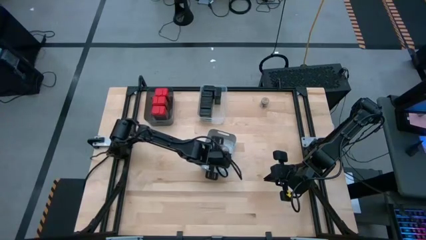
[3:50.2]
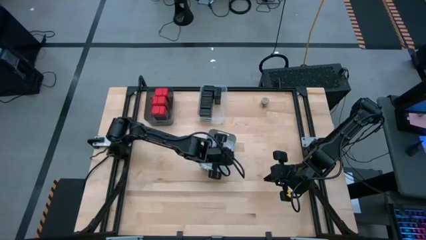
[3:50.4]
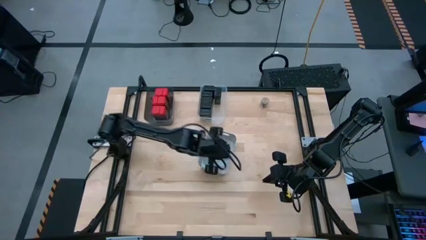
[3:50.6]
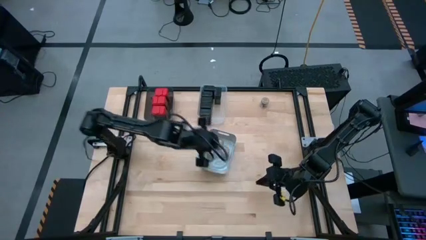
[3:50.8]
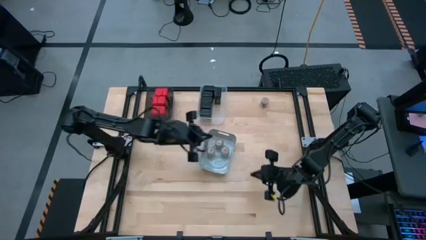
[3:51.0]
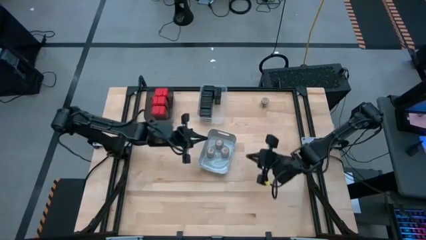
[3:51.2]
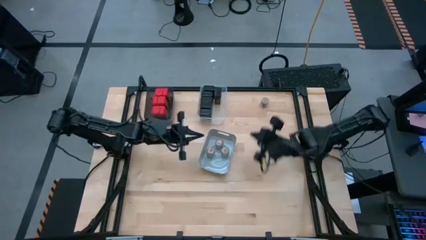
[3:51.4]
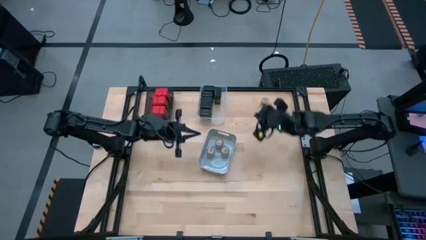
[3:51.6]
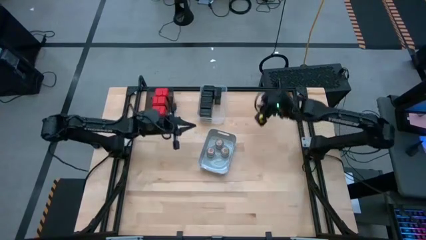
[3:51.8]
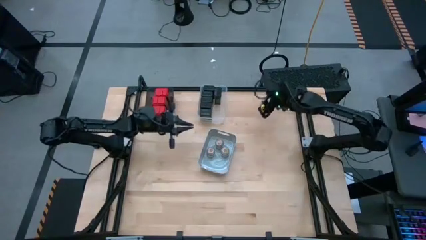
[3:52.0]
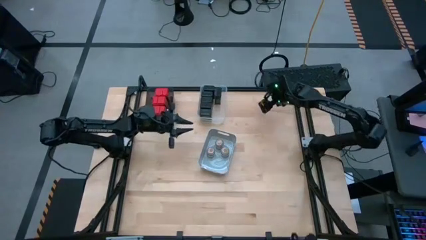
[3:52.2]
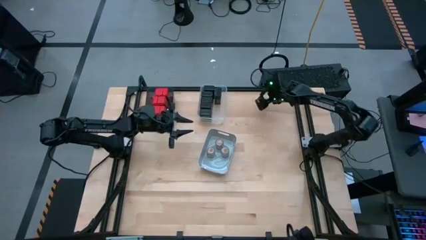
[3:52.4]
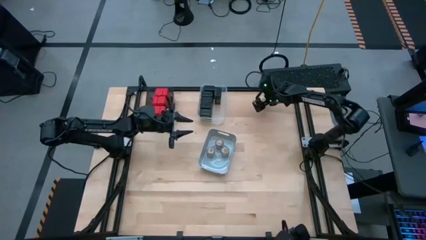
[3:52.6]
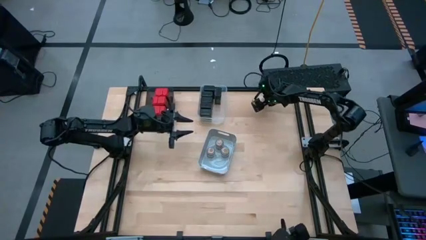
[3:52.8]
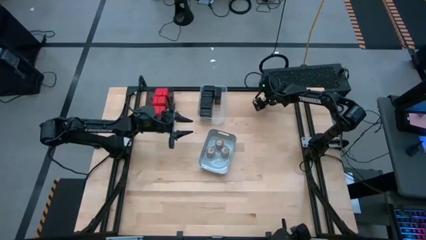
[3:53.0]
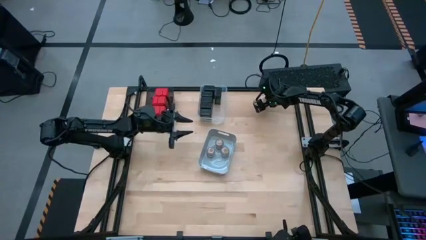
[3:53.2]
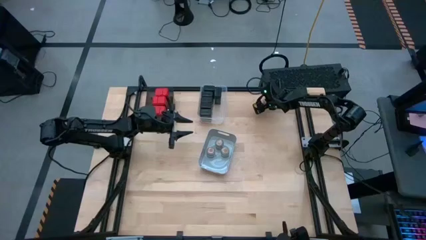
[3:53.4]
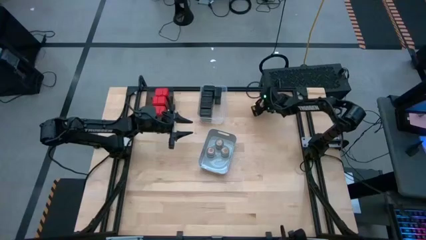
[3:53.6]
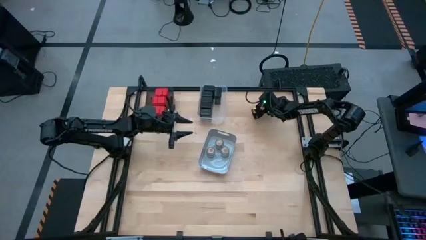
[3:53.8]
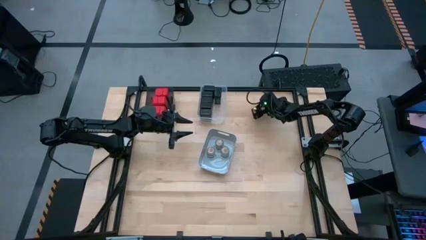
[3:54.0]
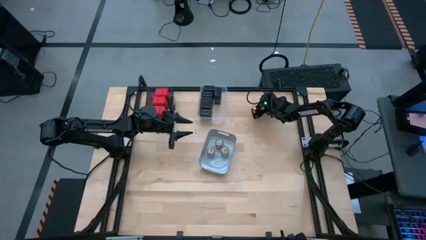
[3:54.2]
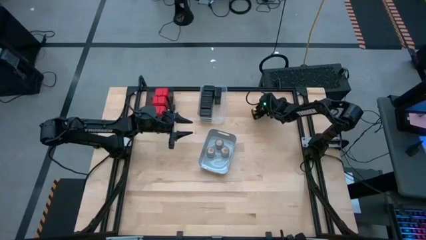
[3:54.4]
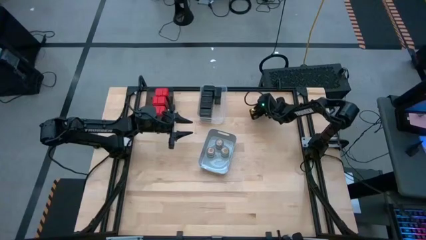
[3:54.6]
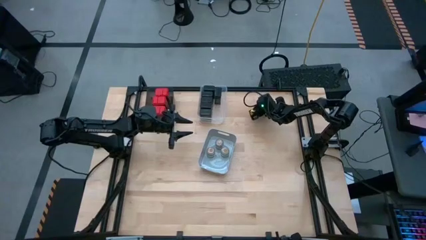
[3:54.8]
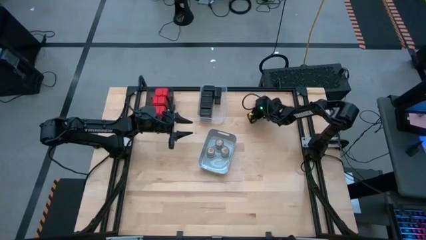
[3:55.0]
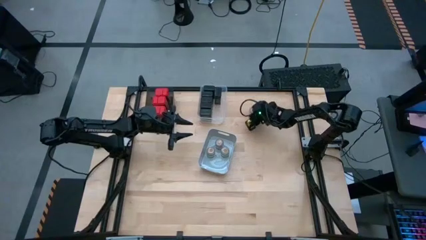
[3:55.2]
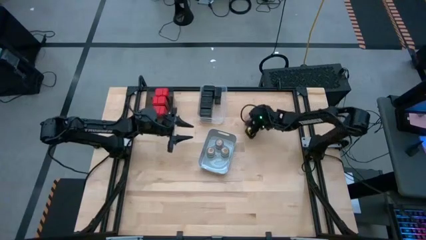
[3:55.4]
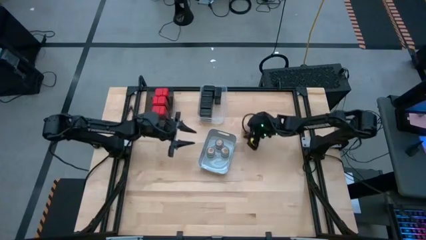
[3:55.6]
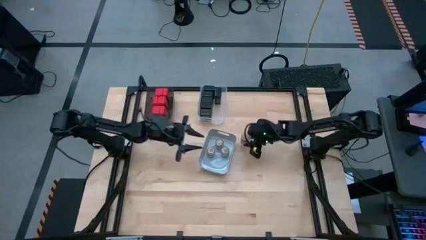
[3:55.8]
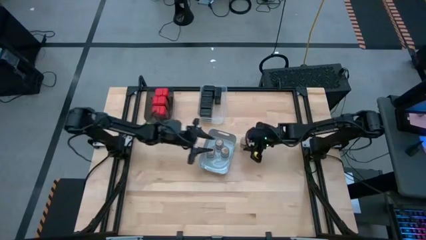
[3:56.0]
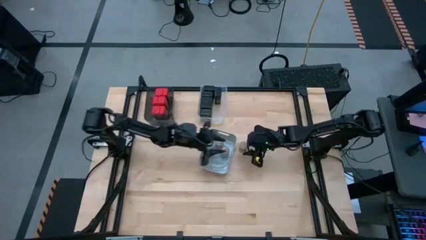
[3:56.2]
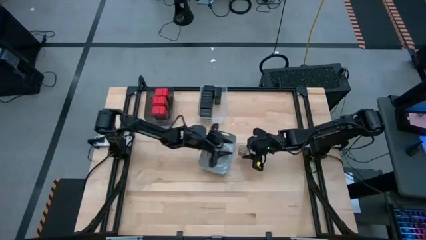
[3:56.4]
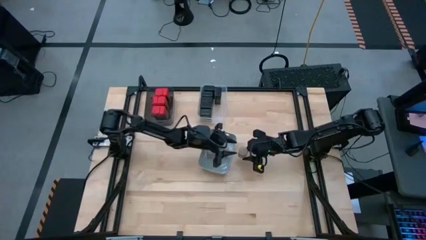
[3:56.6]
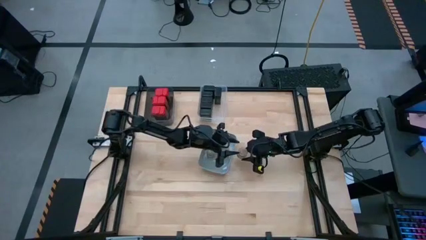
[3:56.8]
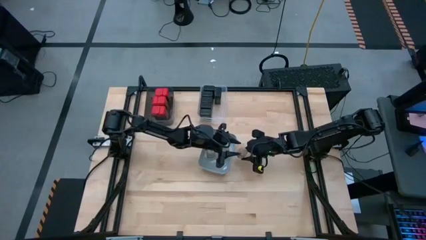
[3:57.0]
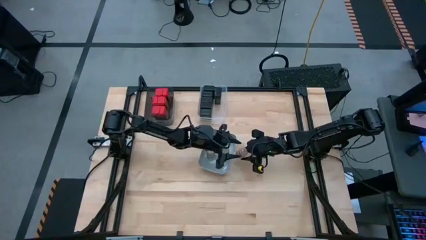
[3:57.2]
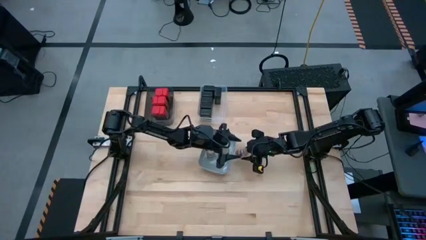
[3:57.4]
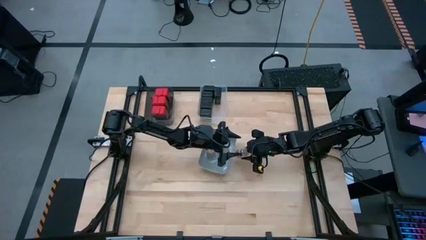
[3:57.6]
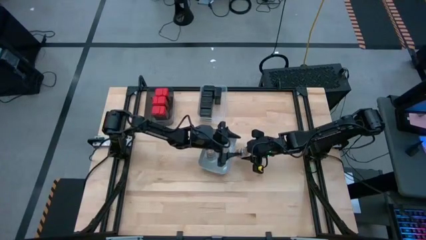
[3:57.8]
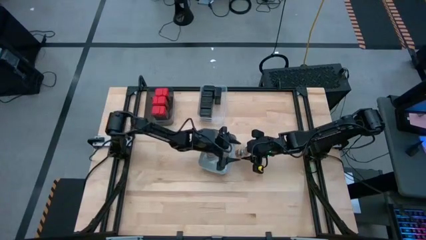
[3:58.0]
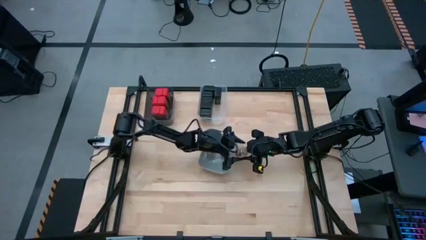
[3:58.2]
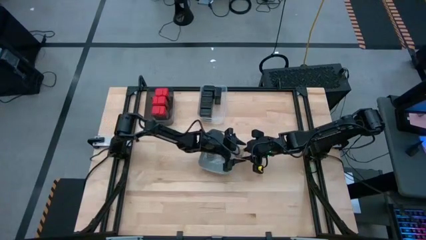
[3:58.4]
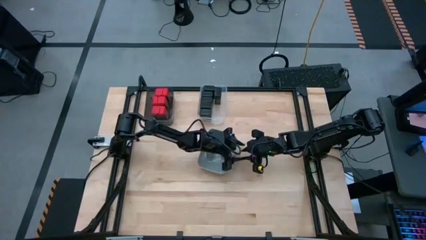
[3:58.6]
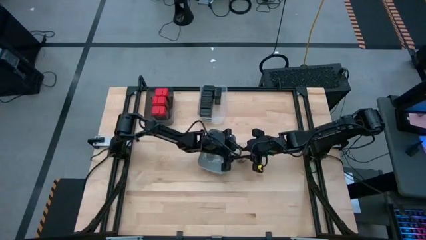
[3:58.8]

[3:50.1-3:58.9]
Task: Sort spices by type
Put the brown seasoning bottle into the gray bin

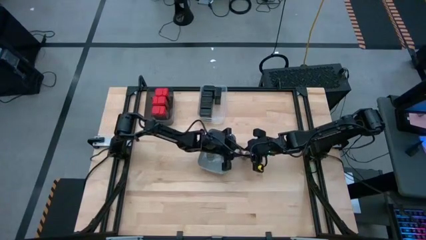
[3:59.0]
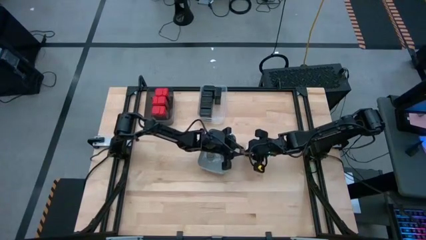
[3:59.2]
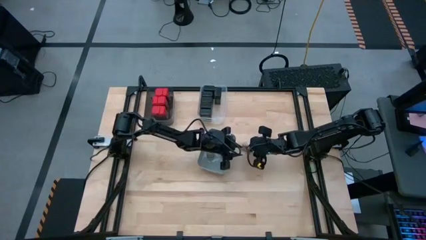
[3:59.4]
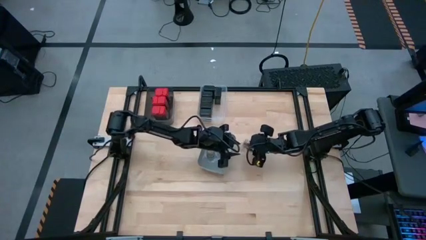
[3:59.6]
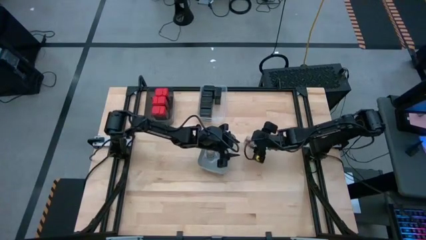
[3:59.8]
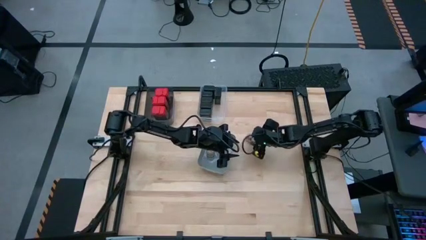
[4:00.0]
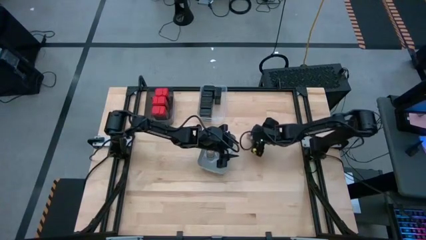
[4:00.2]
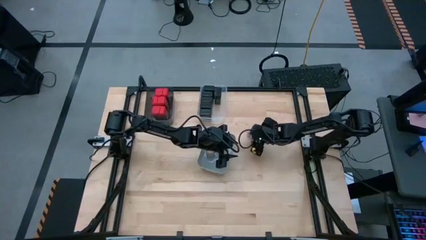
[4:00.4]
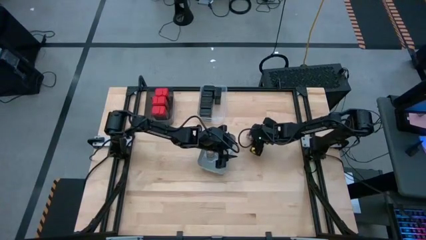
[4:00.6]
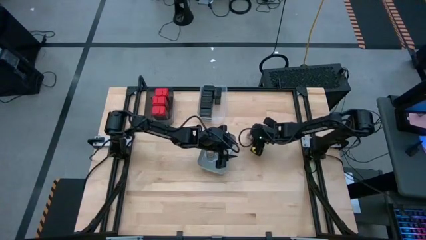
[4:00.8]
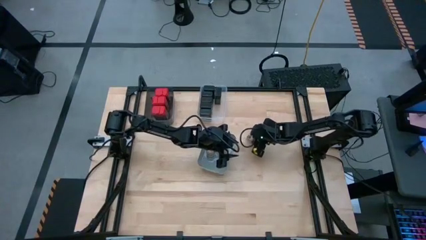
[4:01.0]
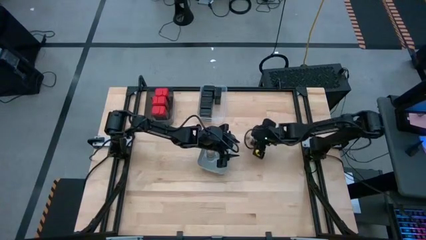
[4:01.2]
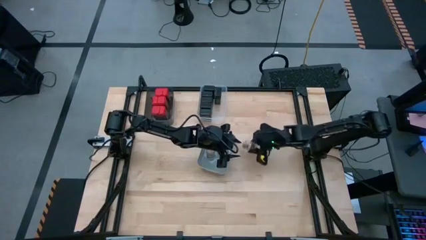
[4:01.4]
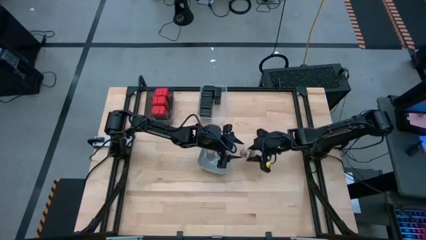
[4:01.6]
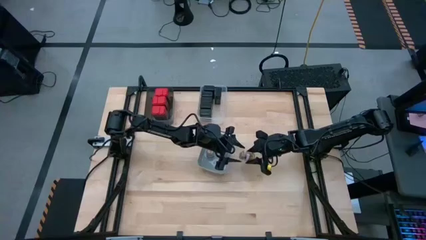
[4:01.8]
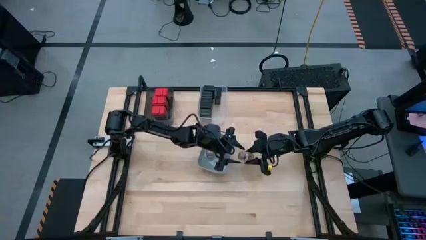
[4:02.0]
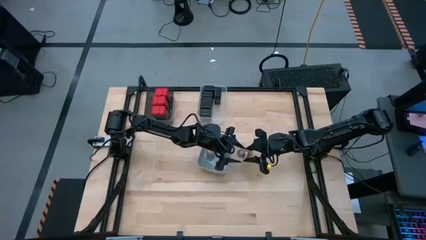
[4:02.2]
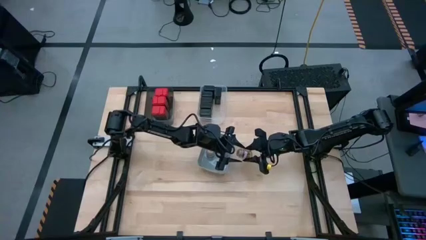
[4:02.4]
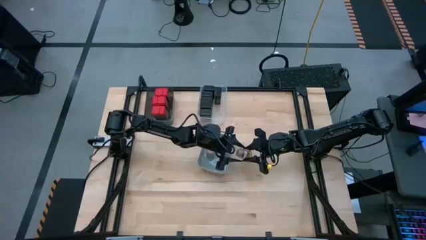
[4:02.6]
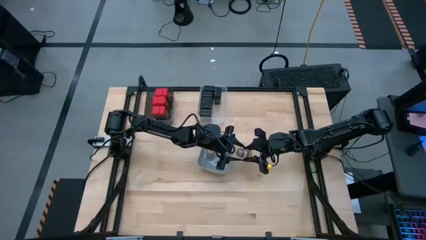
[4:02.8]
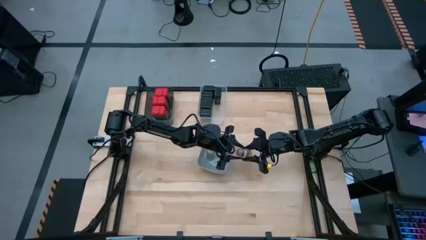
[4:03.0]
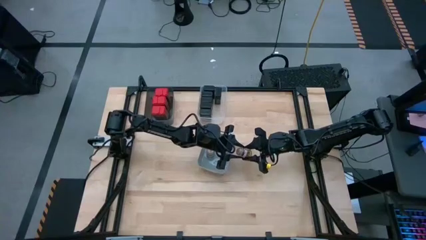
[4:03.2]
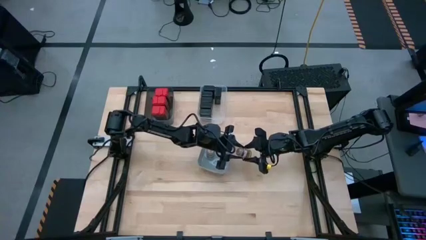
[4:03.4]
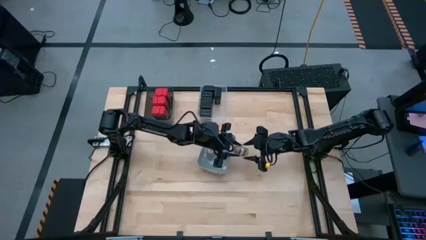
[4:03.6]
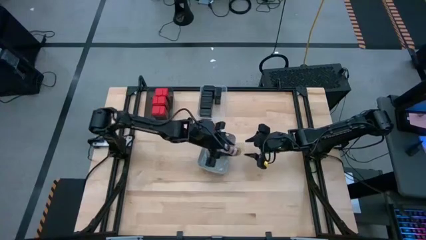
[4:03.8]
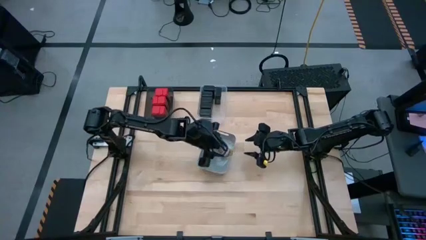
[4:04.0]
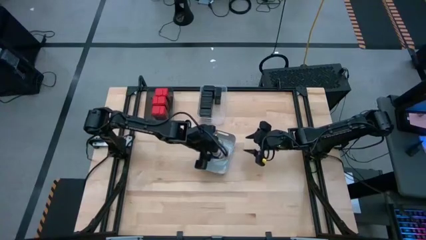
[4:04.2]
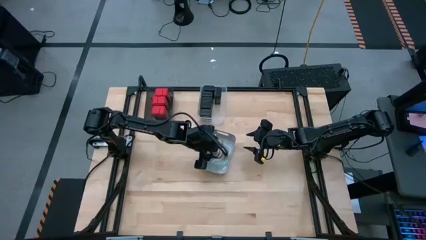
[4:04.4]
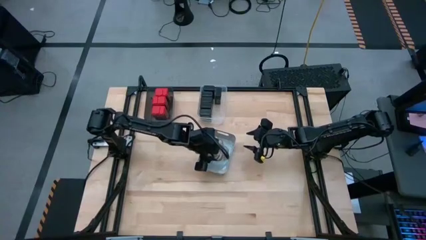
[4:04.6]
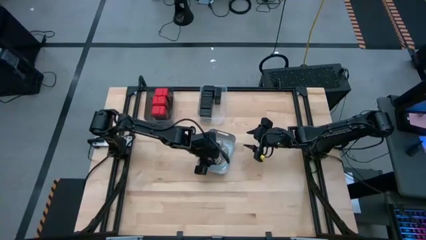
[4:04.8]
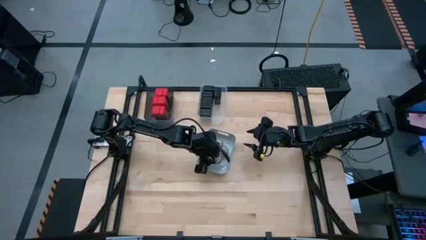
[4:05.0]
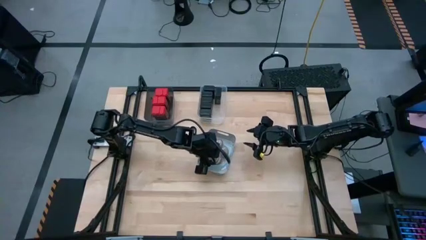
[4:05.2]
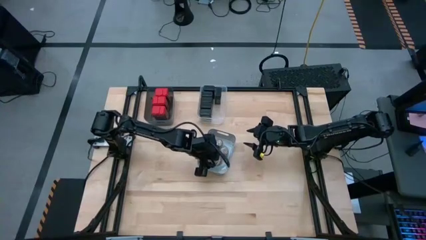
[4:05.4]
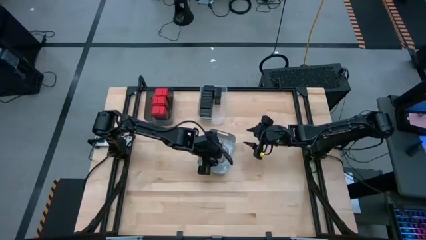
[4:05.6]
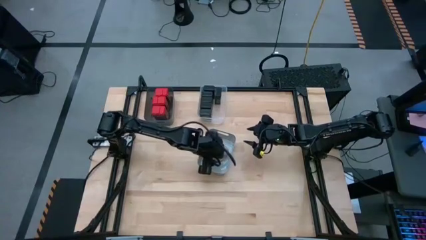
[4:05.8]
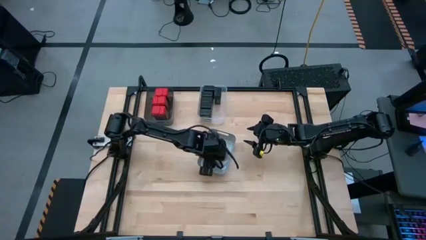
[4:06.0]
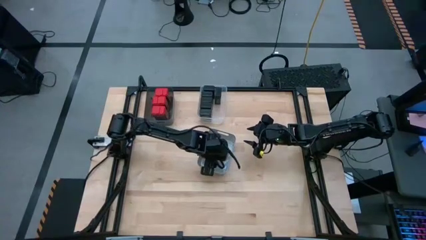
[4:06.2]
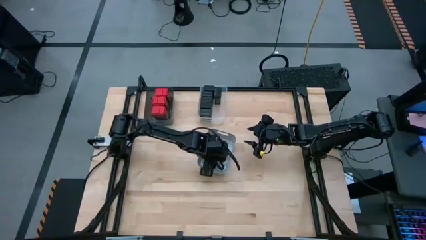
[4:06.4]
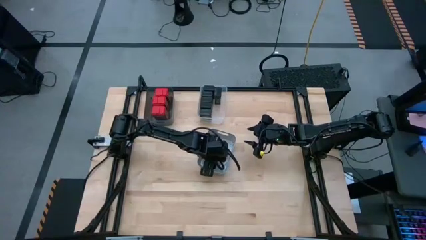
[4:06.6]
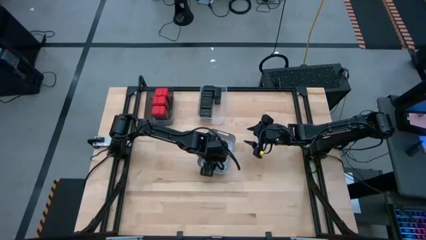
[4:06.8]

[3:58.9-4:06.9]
Put the brown seasoning bottle into the gray bin

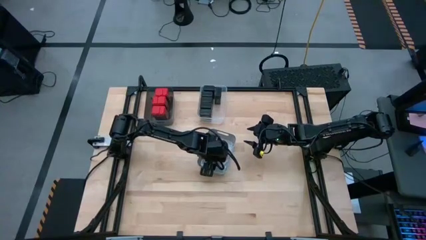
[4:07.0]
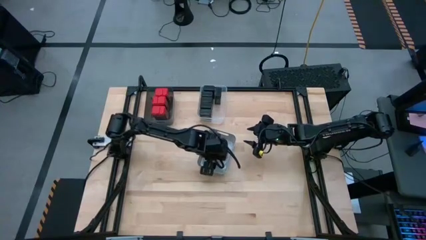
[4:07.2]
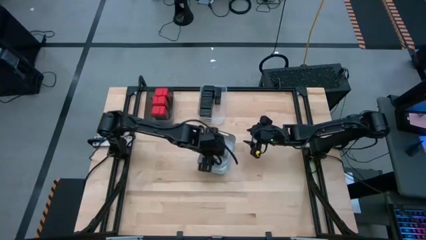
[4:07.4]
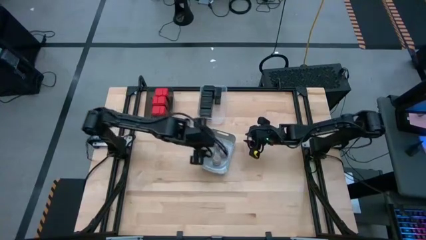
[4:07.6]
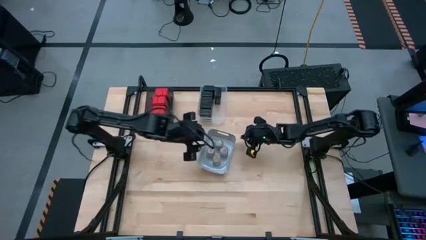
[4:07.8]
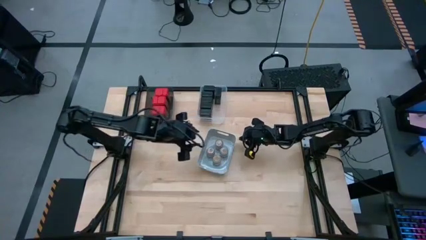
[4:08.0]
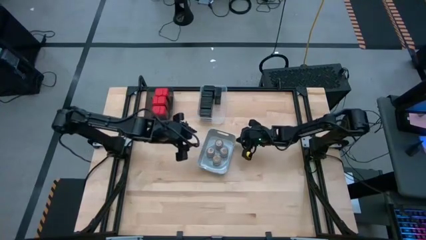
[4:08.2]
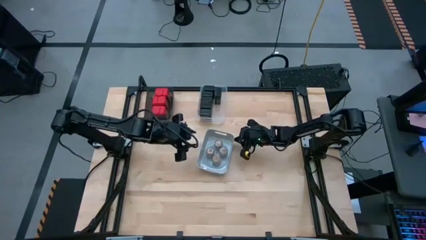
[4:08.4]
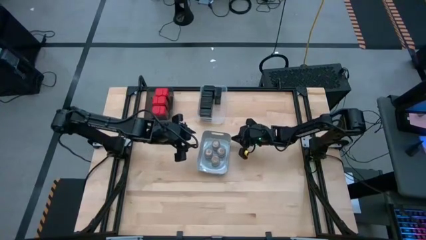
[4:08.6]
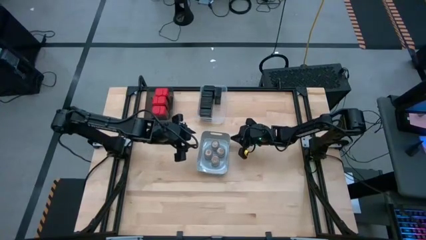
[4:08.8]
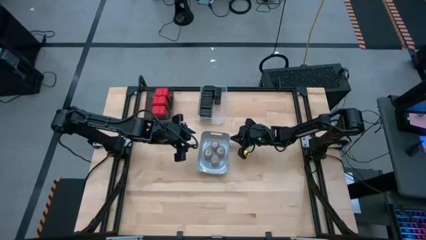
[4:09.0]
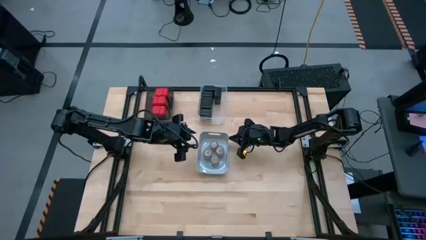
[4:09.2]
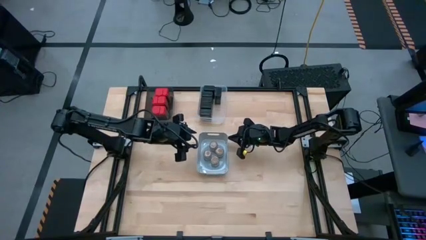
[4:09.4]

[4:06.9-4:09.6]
Adjust the gray bin on the table
